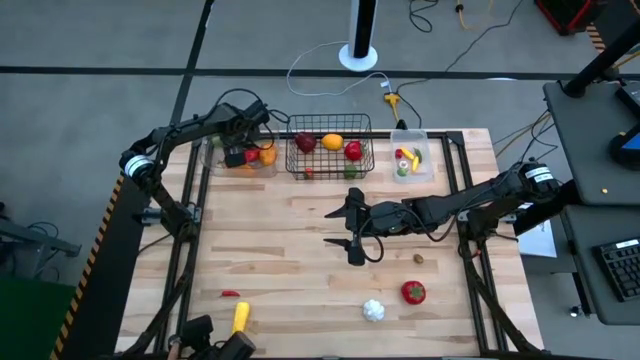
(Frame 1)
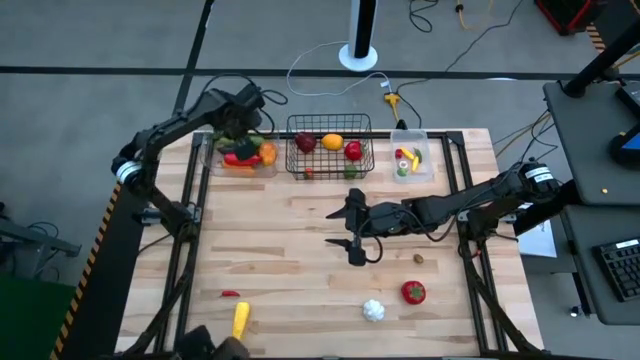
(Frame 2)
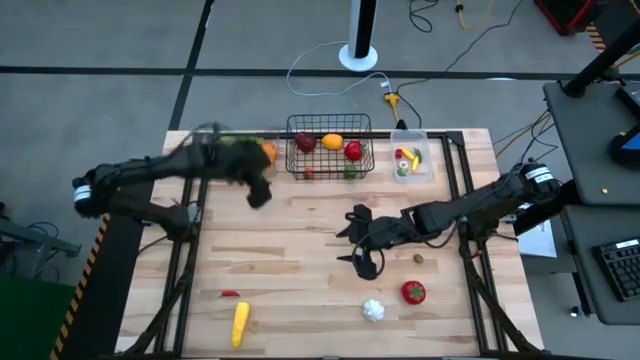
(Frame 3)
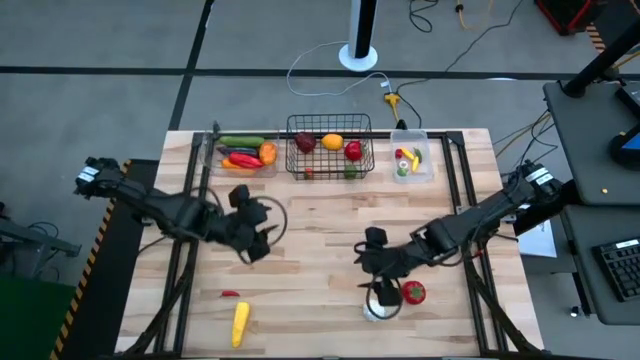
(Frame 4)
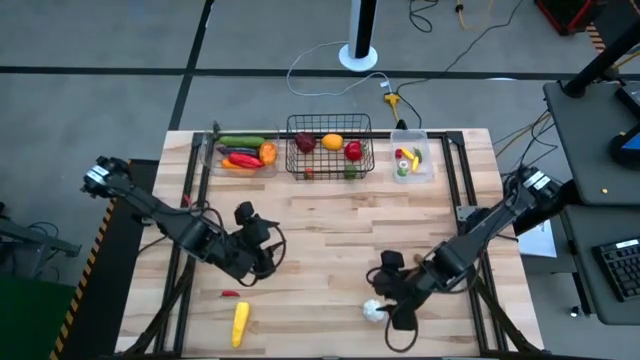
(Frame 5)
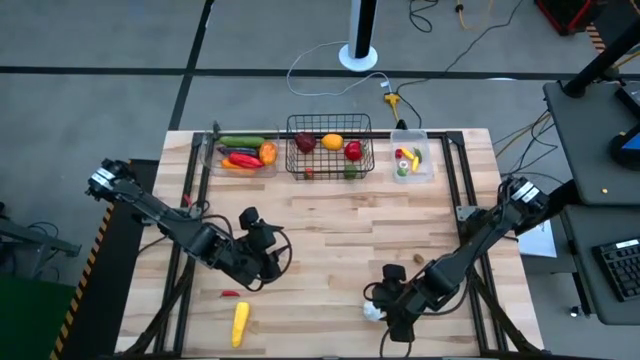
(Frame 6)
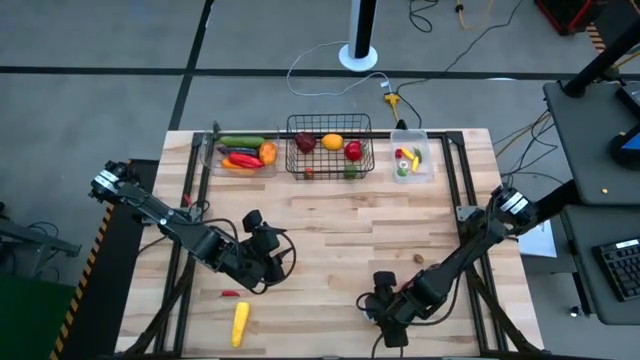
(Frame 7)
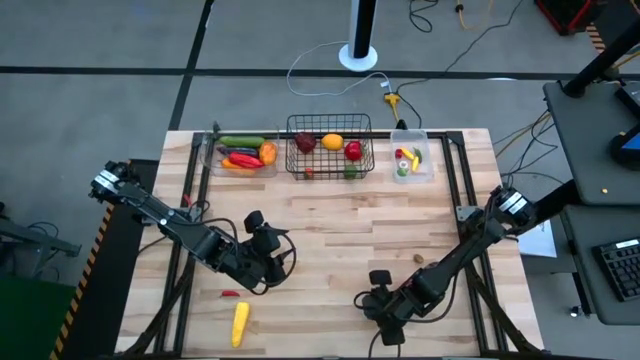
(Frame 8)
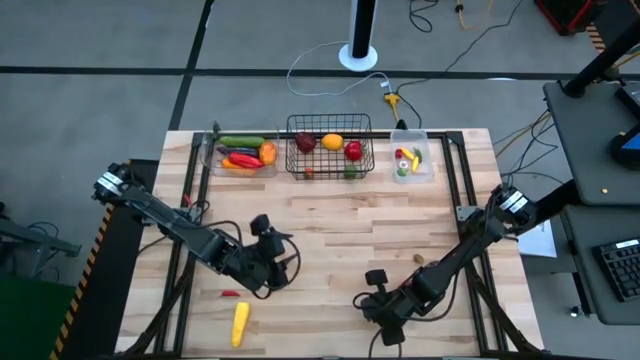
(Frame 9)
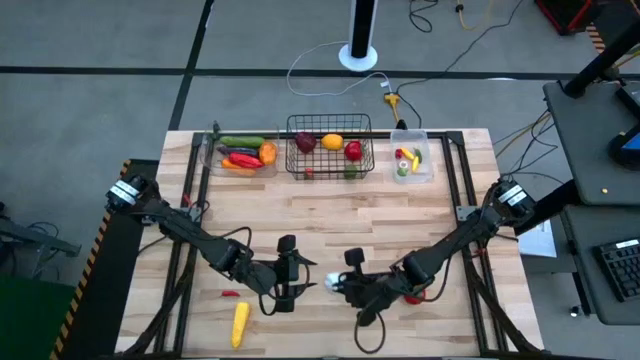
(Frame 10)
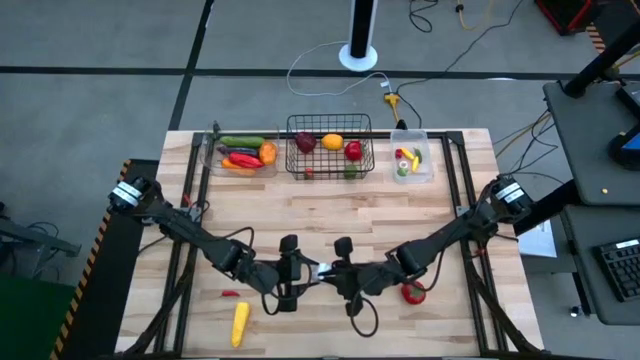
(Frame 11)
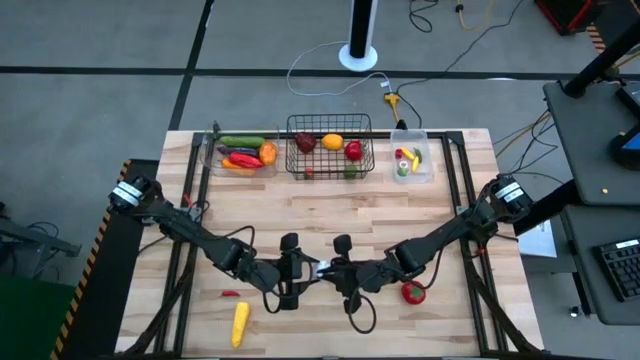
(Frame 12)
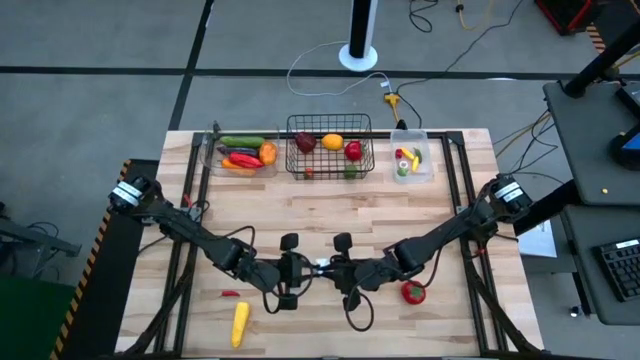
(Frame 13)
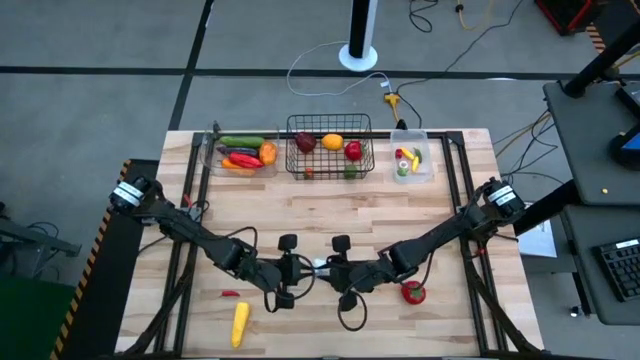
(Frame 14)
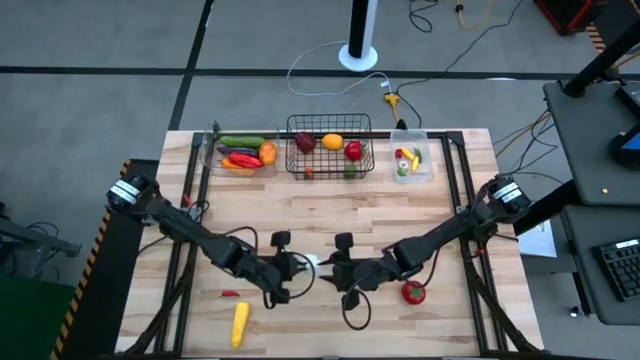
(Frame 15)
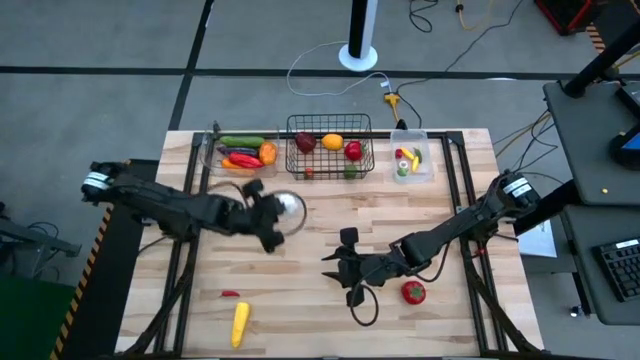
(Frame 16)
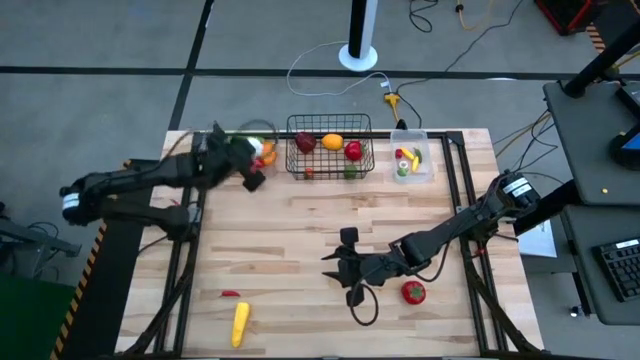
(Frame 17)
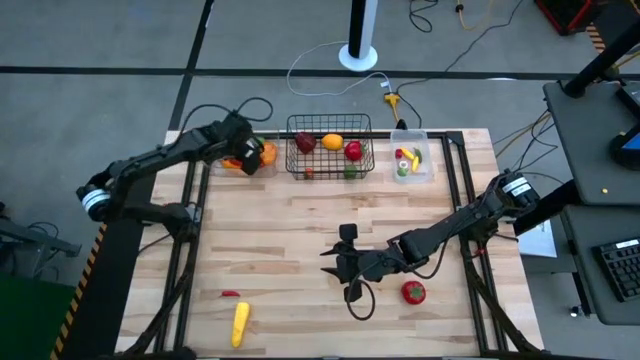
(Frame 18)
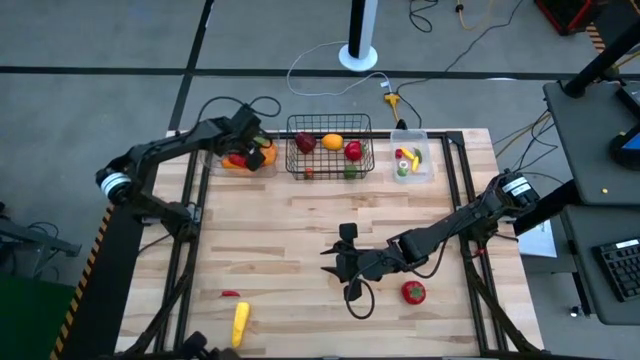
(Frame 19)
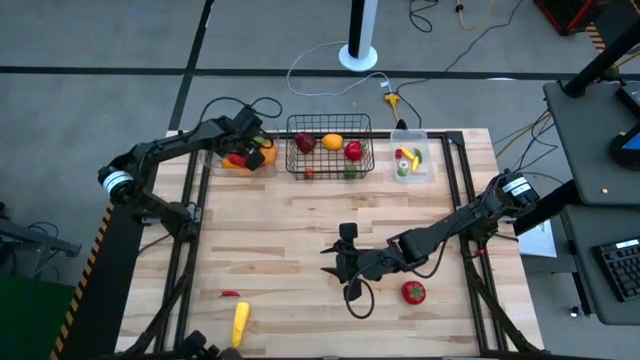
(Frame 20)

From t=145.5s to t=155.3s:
Task: Sort produce into baskets
Put the garlic into the clear bin

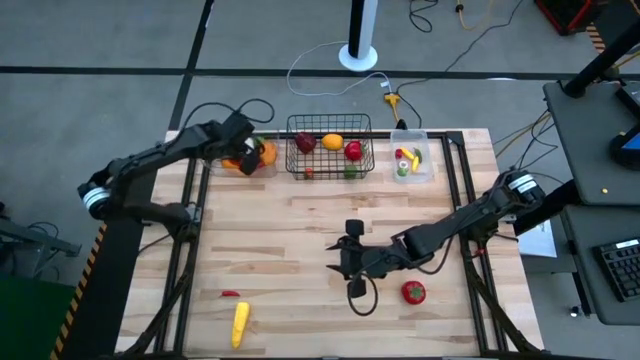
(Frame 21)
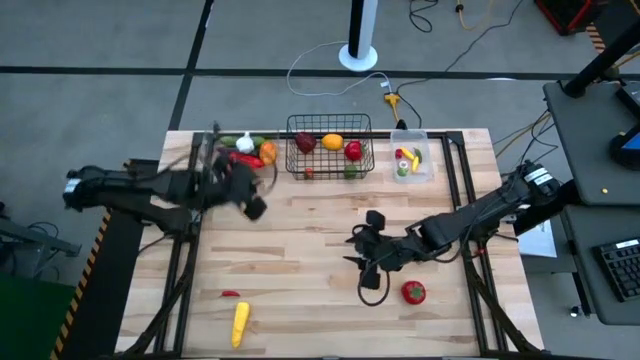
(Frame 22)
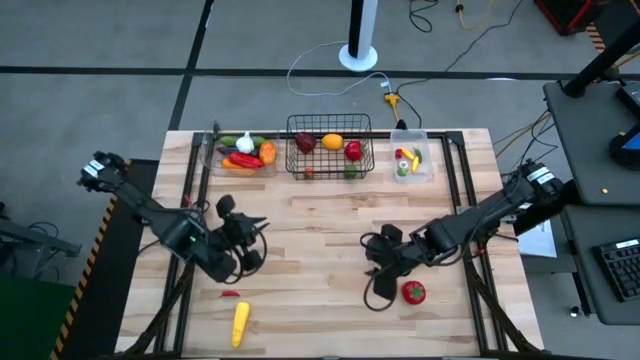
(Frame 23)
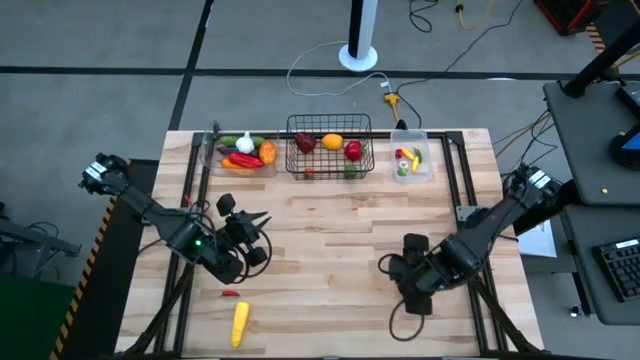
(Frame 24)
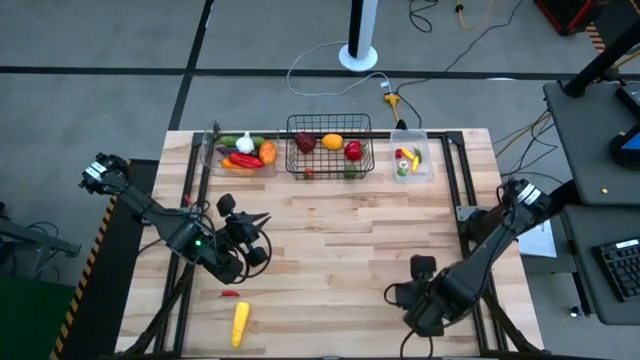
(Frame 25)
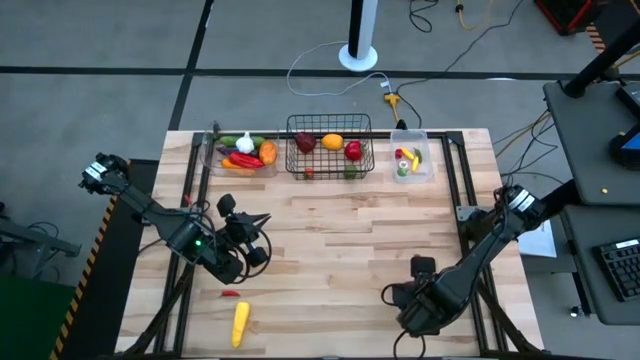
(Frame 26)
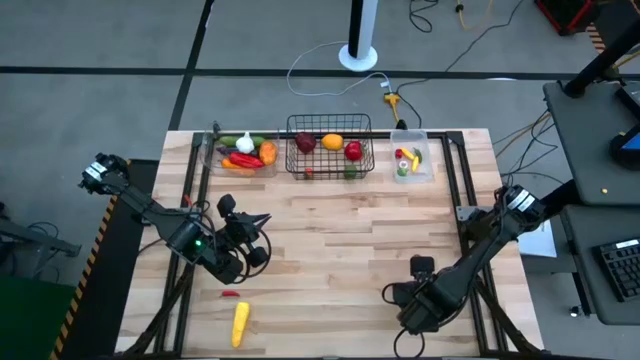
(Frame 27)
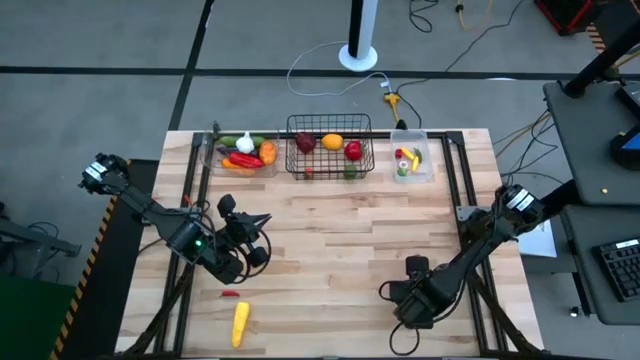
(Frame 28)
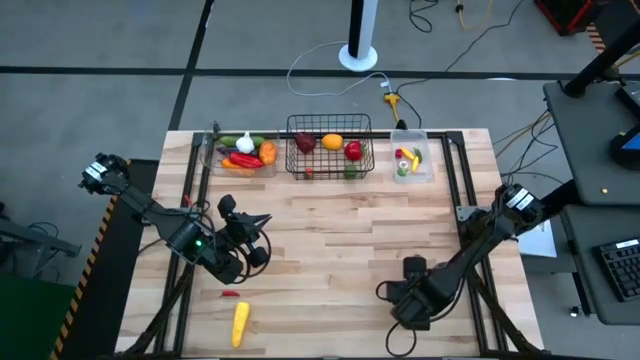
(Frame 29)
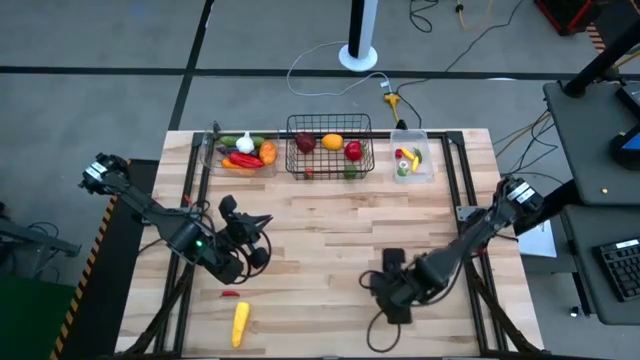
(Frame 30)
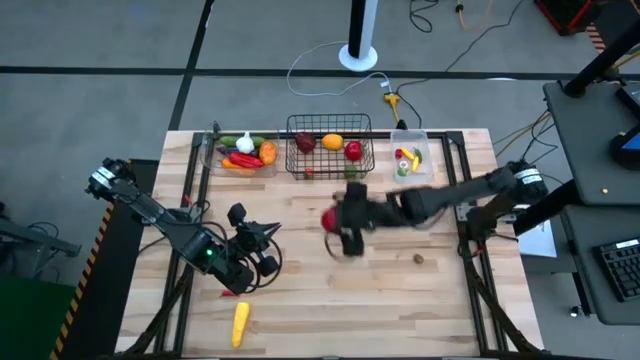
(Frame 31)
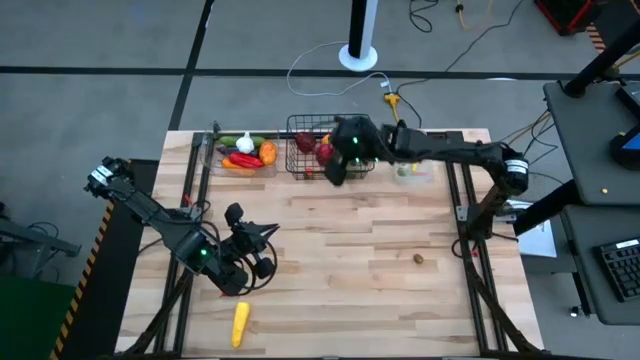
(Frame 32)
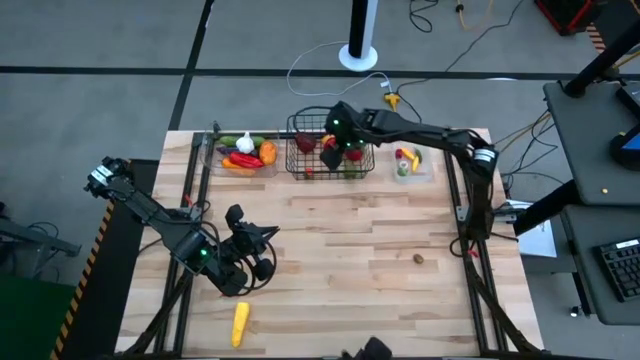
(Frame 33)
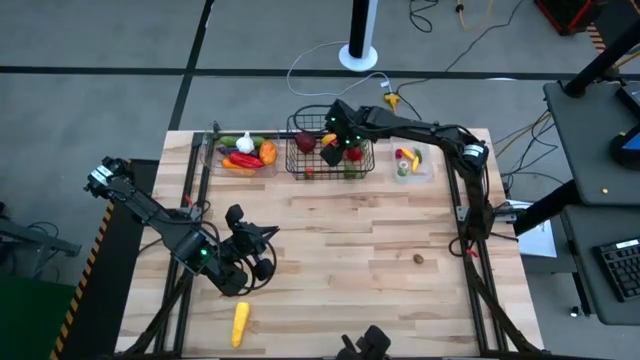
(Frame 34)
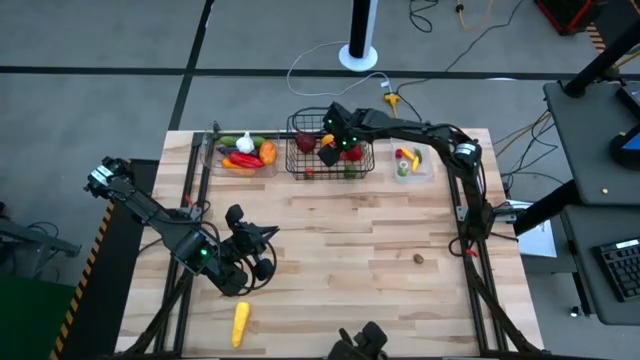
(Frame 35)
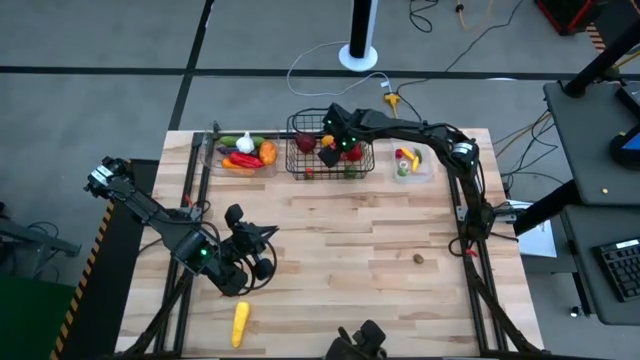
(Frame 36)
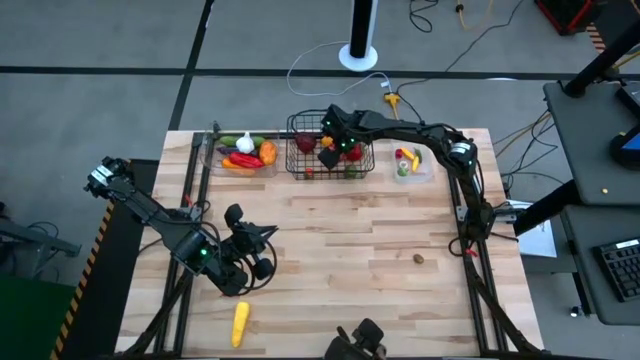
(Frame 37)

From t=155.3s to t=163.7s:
Put the tomato into the wire basket

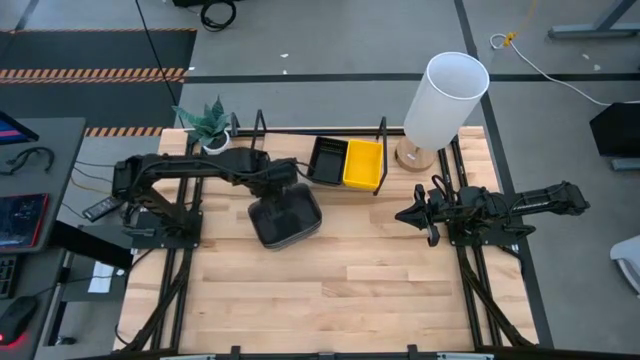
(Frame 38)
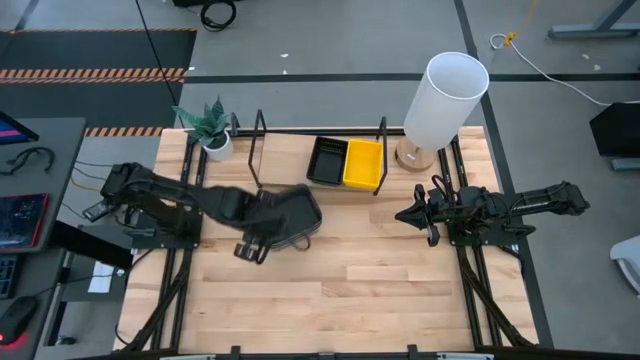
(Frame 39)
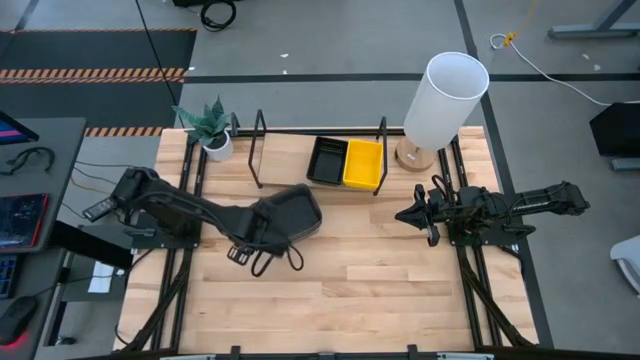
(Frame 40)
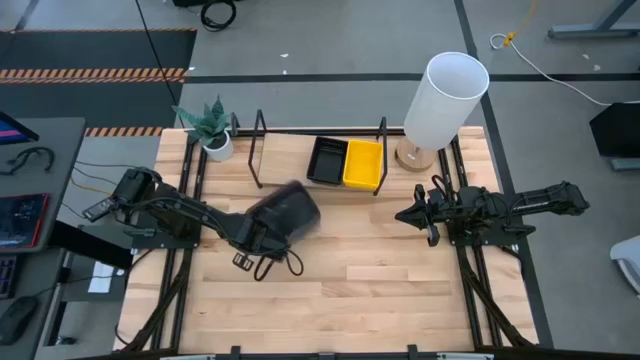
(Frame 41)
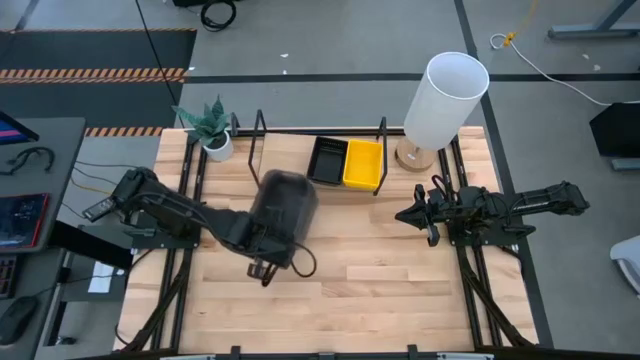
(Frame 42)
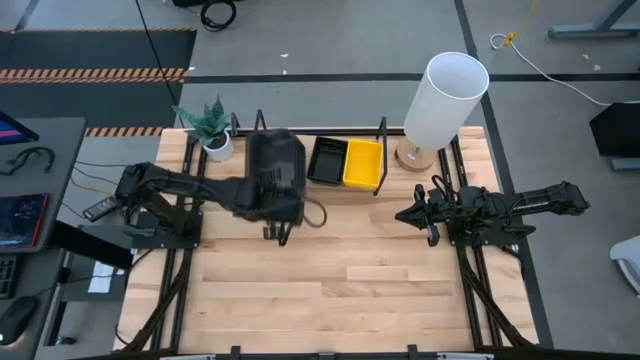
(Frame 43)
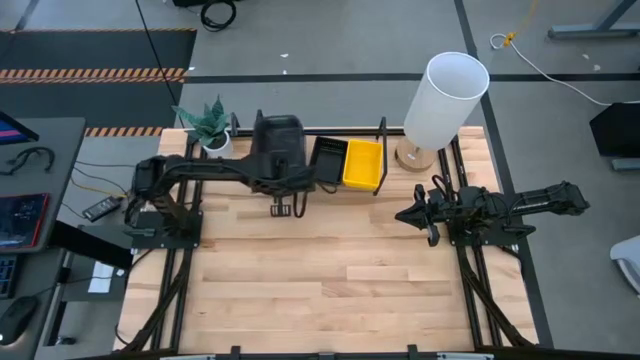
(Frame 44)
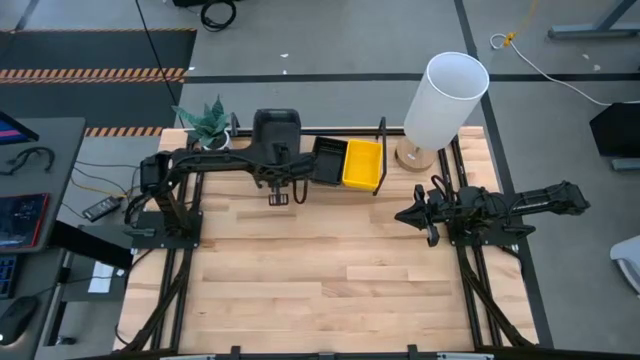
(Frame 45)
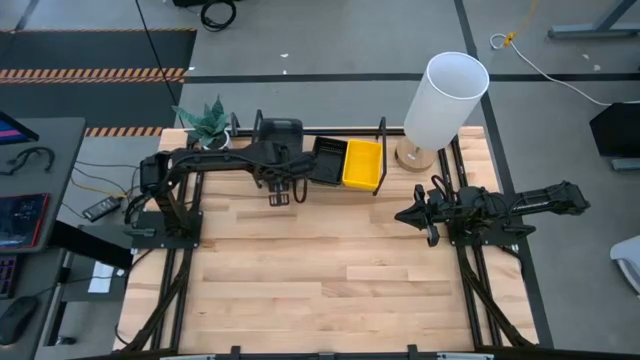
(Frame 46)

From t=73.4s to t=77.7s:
Task: Stack baskets on shelf by color
Put the stacked transparent black bin on the shelf
